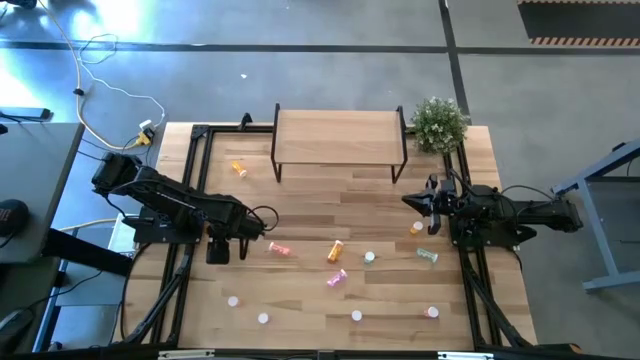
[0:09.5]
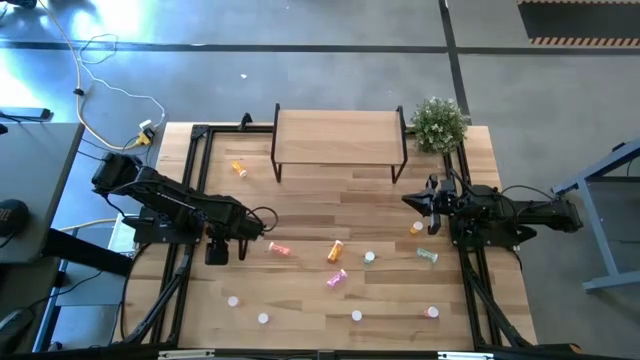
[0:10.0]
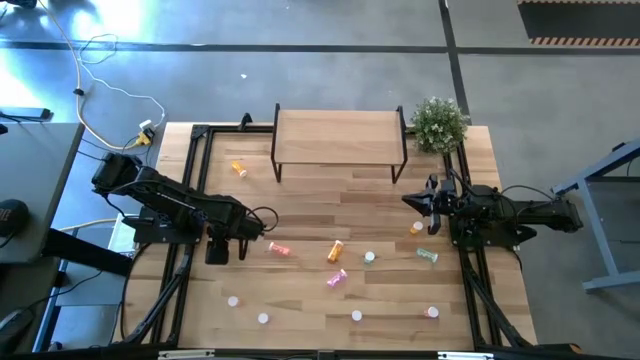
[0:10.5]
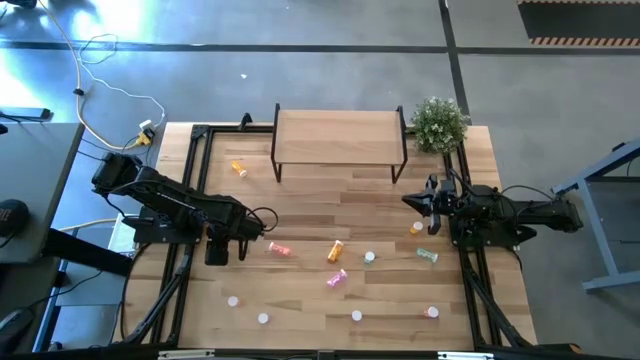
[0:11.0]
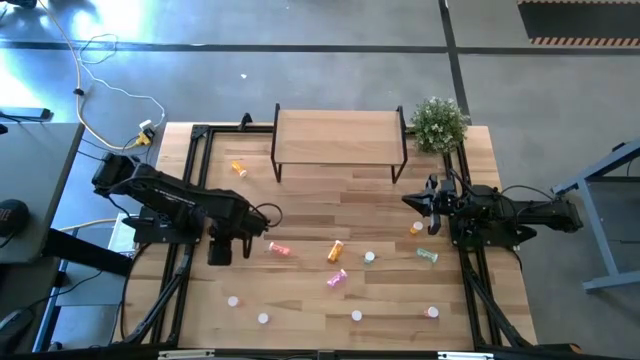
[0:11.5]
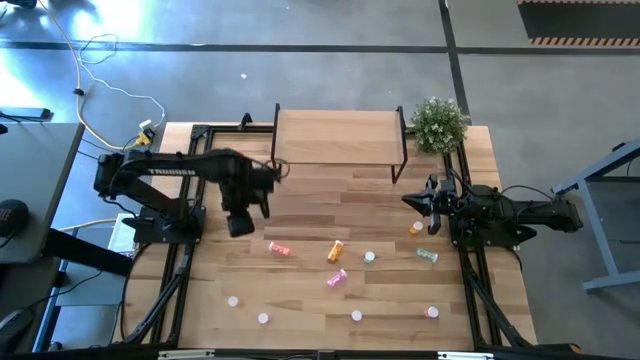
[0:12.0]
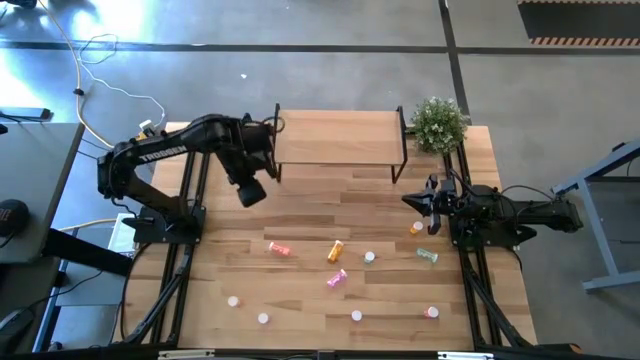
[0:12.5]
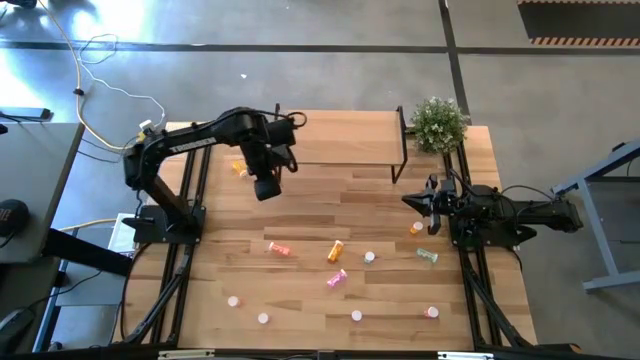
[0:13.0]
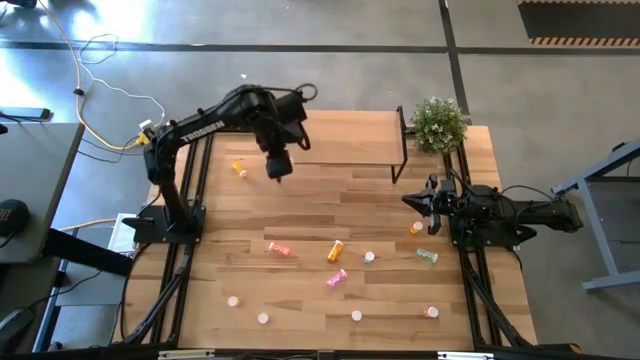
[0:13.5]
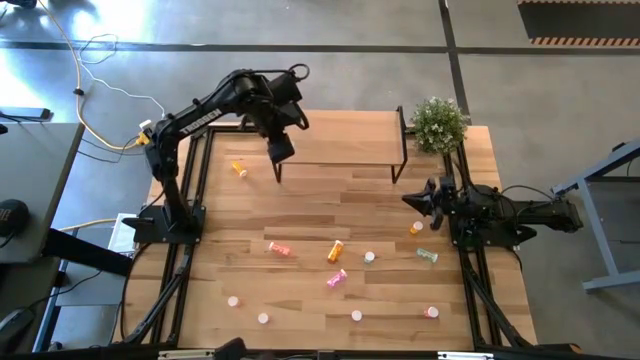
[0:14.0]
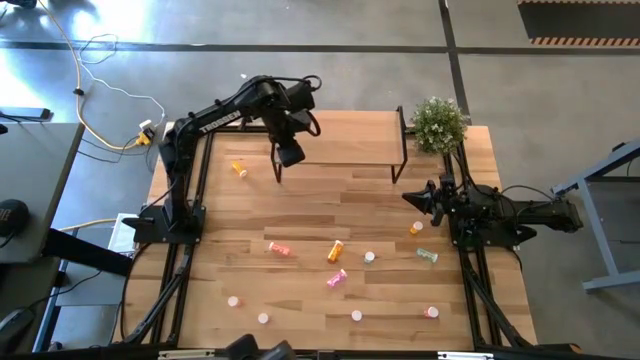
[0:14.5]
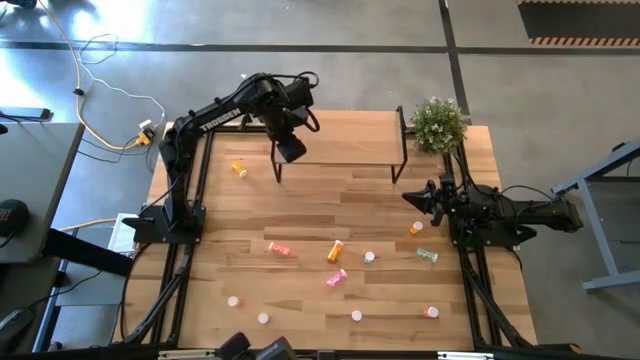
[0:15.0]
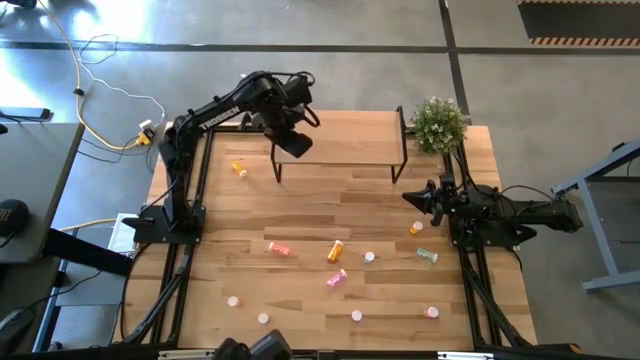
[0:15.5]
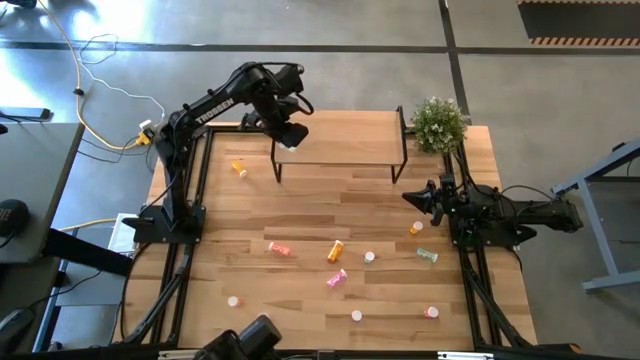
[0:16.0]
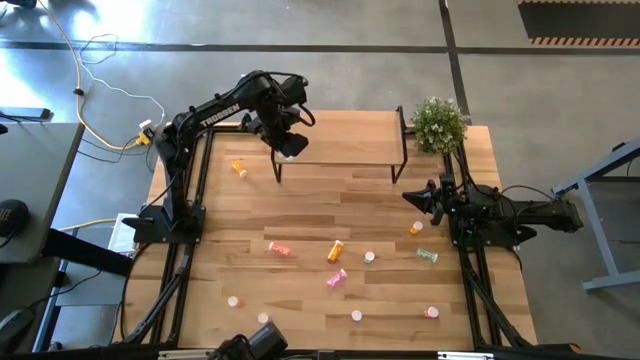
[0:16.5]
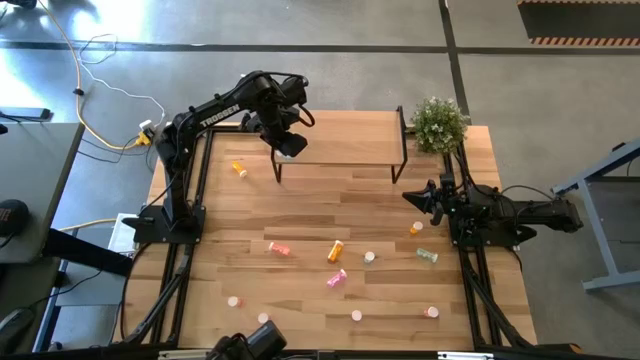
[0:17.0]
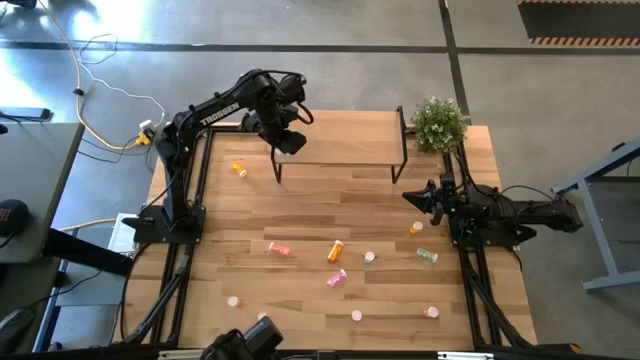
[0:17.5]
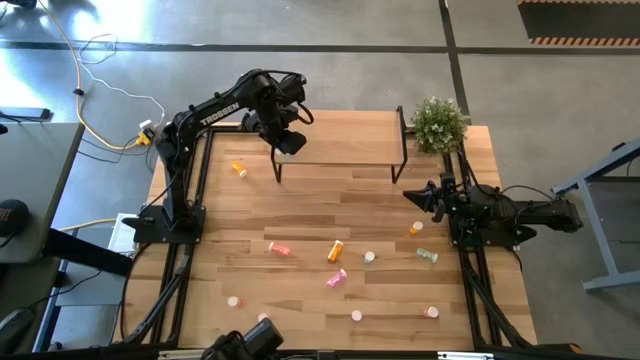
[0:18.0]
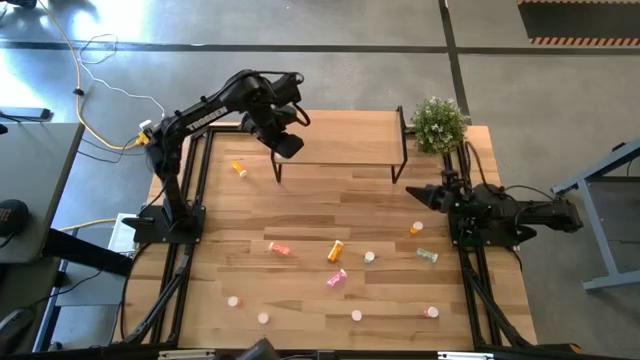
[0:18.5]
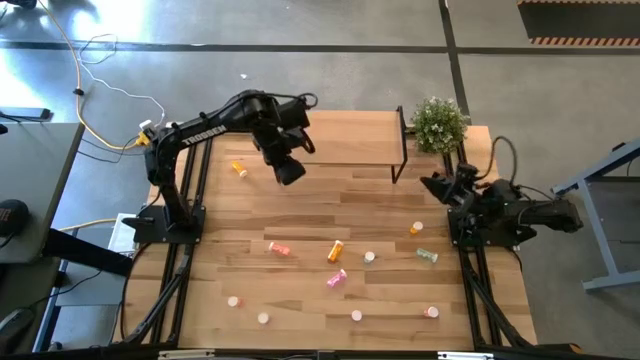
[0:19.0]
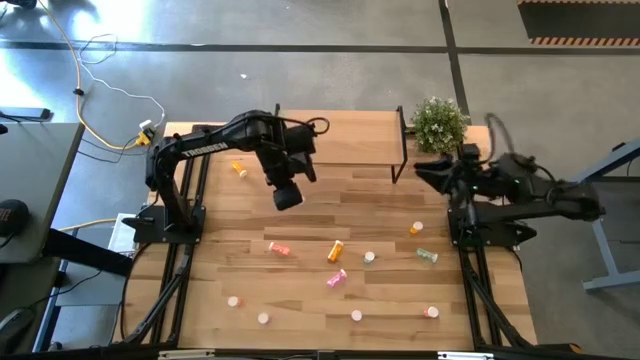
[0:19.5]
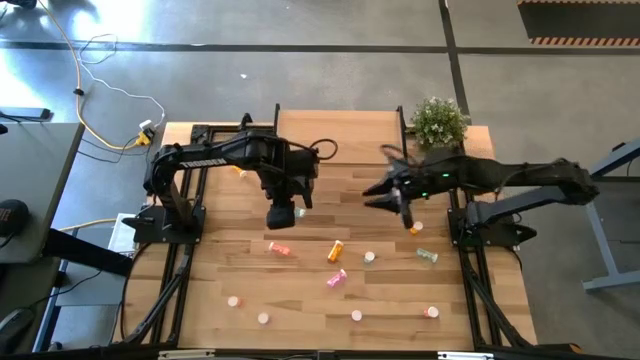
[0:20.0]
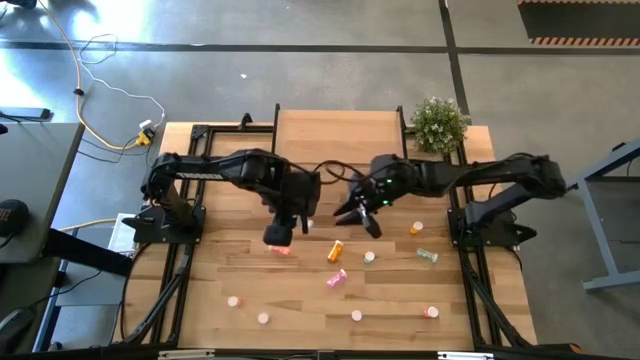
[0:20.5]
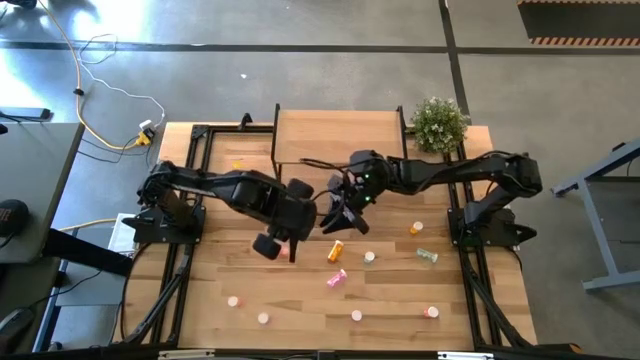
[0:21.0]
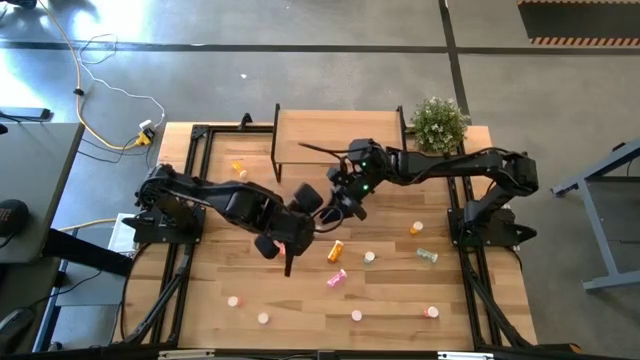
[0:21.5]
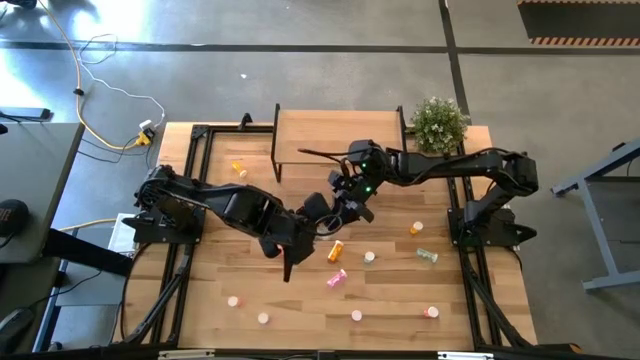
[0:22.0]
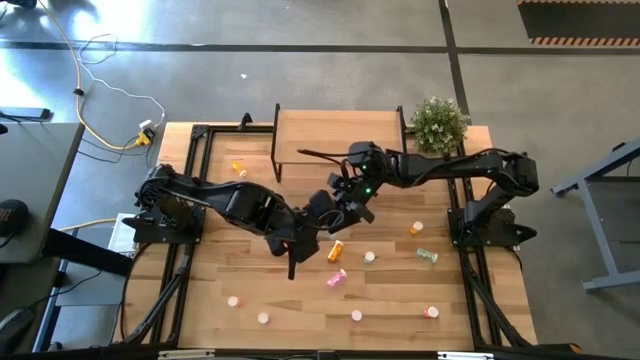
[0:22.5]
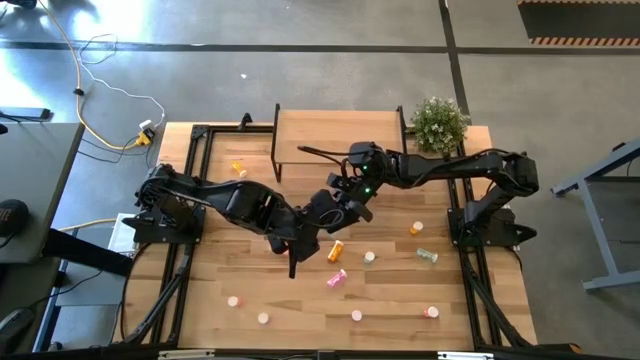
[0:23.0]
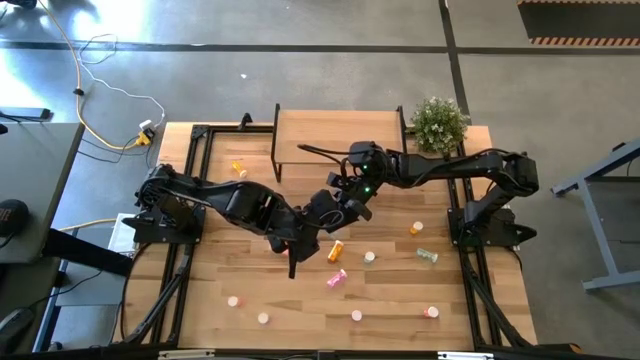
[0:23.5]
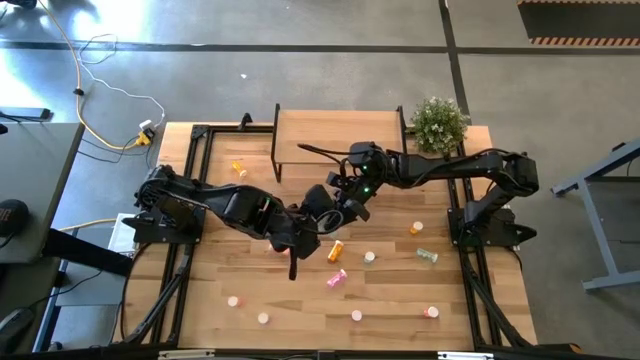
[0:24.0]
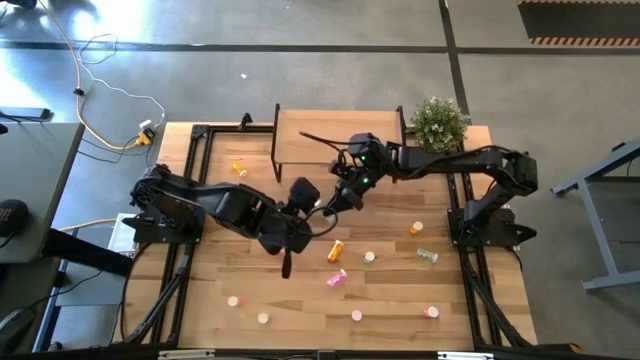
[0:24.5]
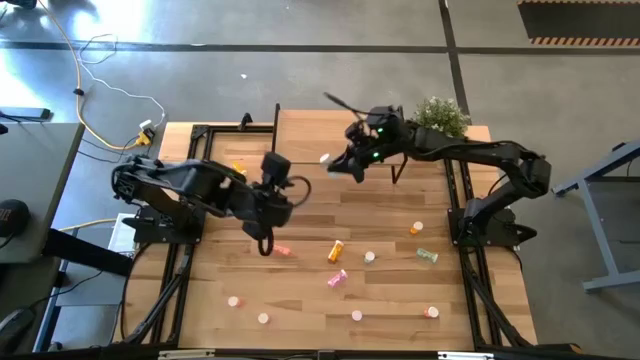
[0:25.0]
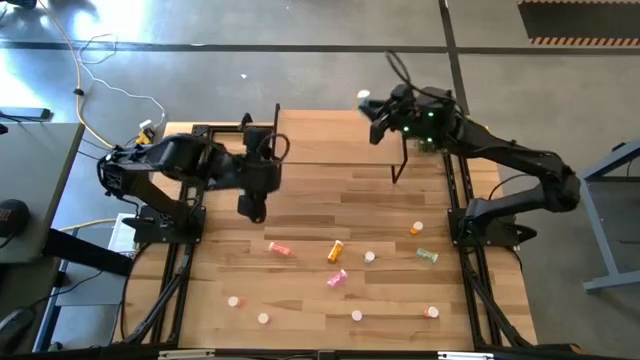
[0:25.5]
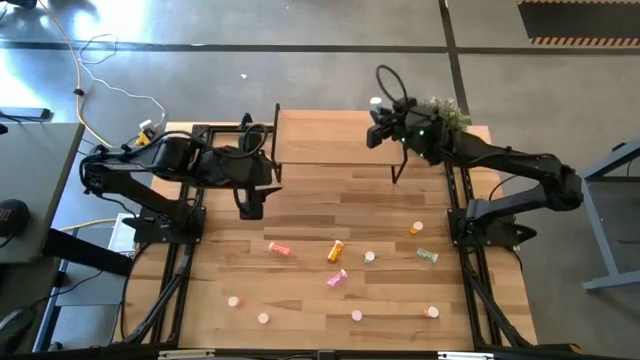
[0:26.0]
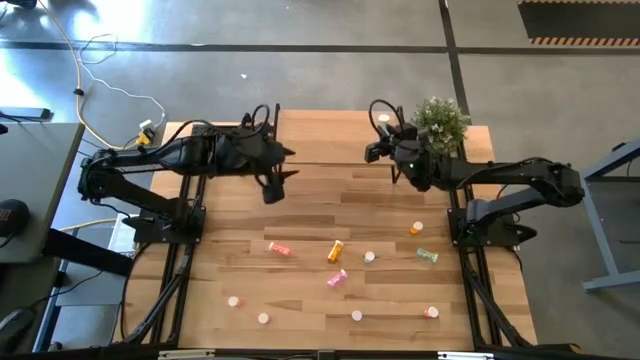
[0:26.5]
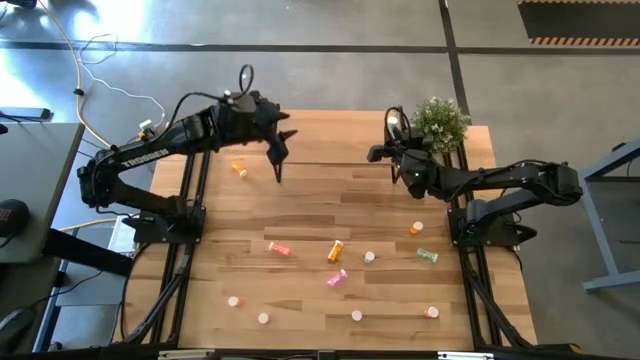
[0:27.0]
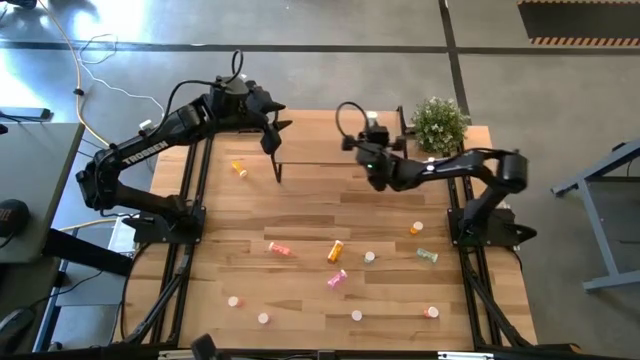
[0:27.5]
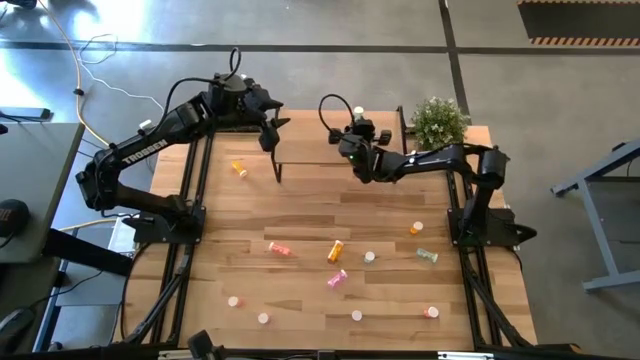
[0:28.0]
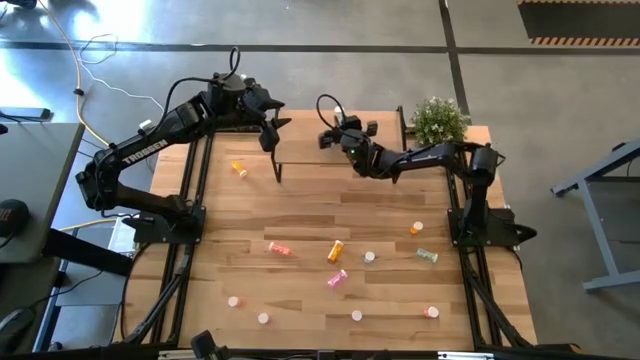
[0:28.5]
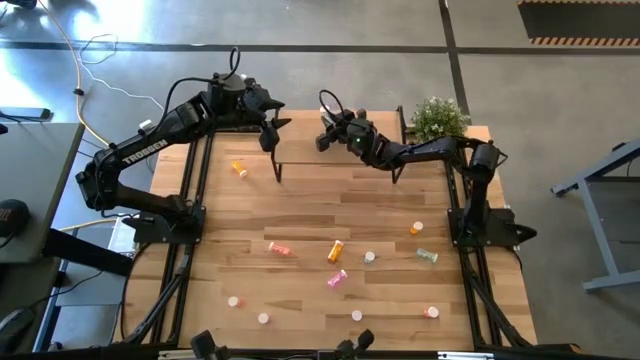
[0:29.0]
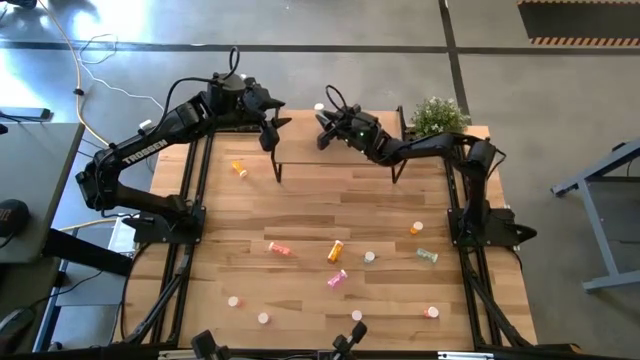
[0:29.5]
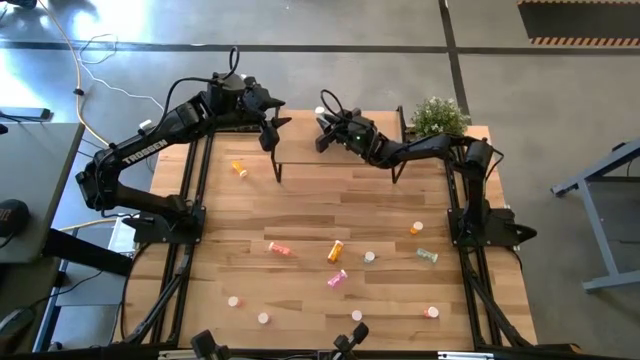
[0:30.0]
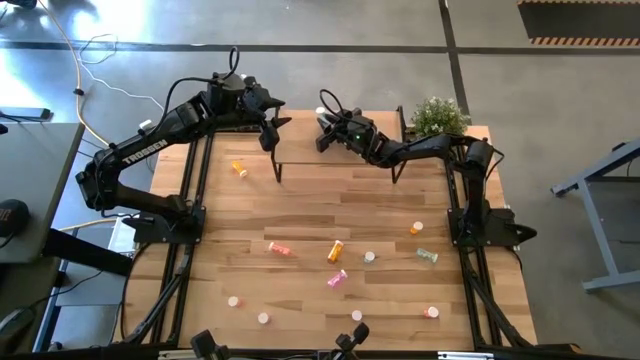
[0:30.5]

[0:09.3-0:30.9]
Task: Pick and place medicine bottles onto shelf by color
Put the left blue pill bottle on the shelf
